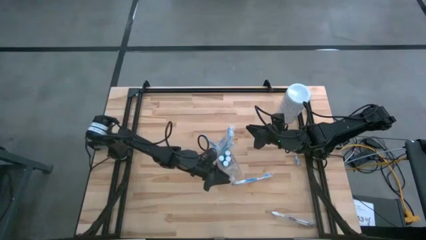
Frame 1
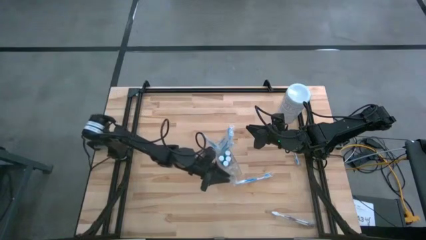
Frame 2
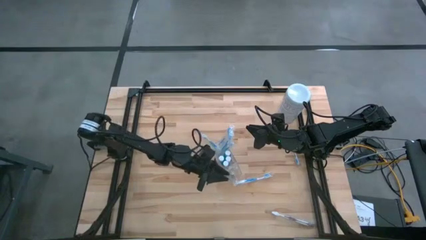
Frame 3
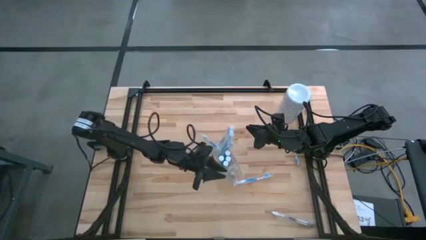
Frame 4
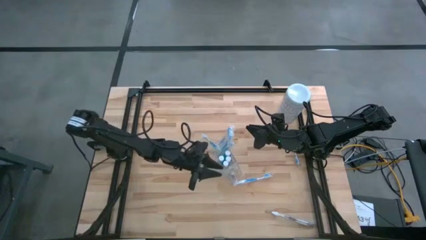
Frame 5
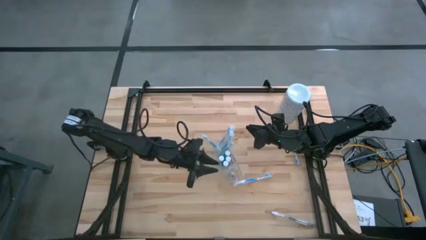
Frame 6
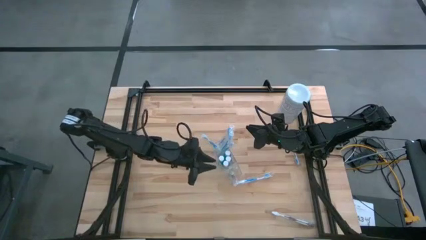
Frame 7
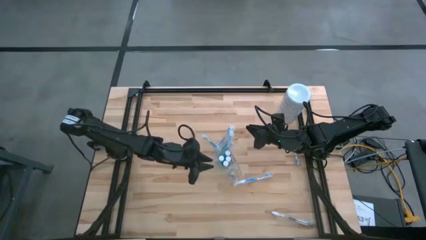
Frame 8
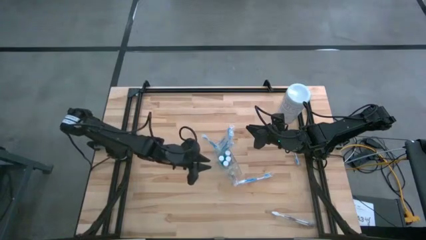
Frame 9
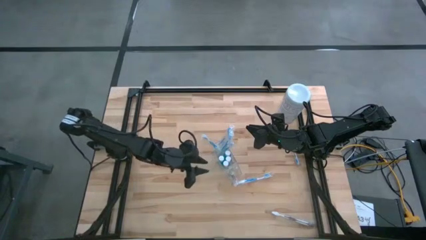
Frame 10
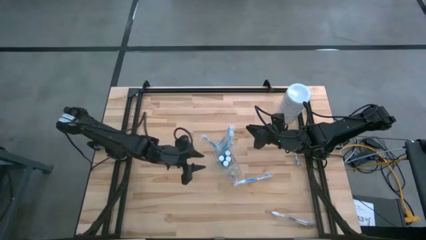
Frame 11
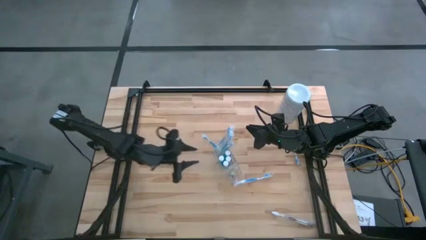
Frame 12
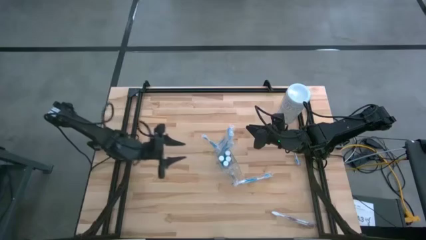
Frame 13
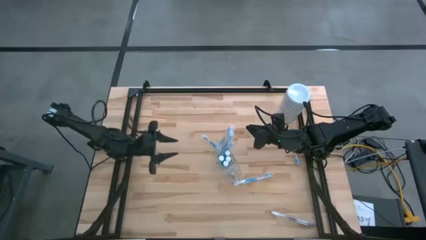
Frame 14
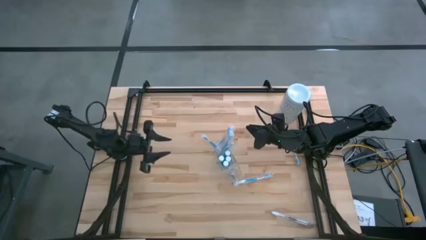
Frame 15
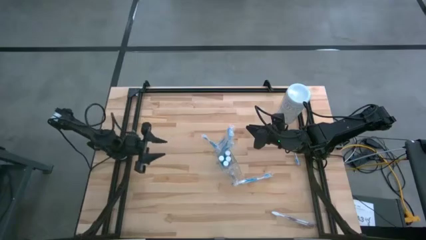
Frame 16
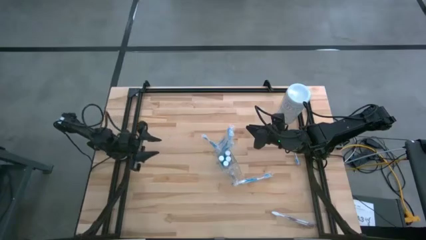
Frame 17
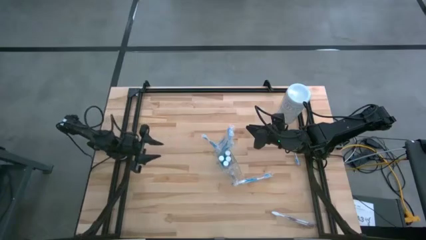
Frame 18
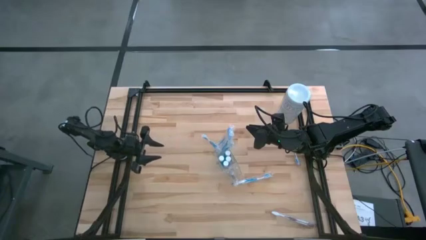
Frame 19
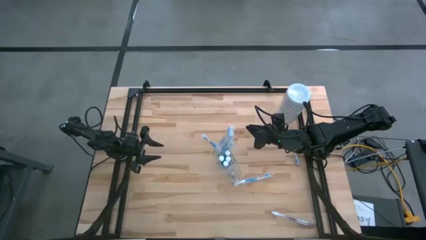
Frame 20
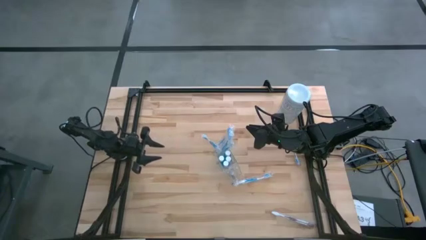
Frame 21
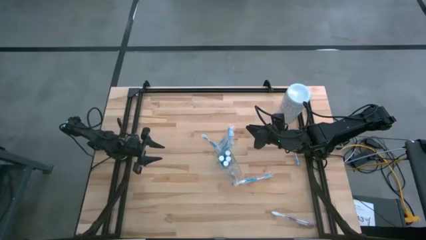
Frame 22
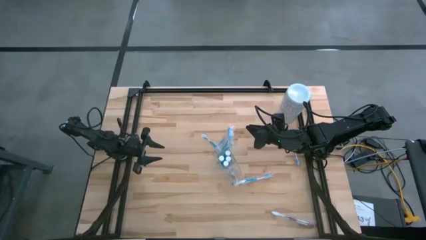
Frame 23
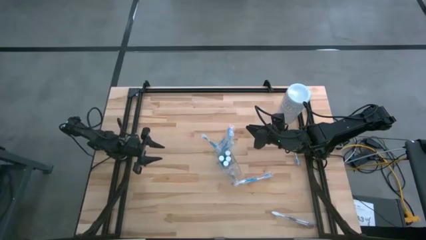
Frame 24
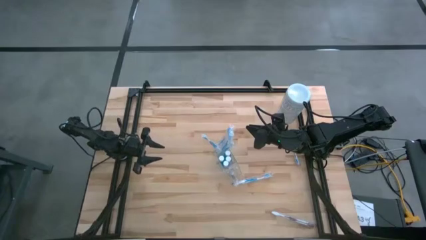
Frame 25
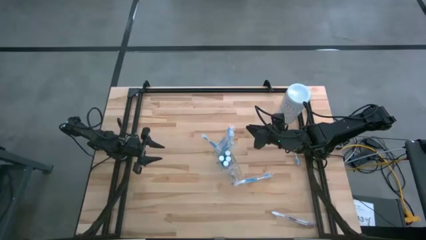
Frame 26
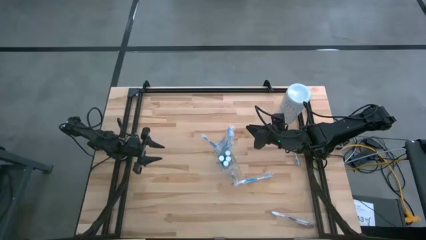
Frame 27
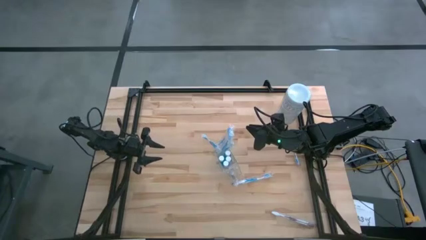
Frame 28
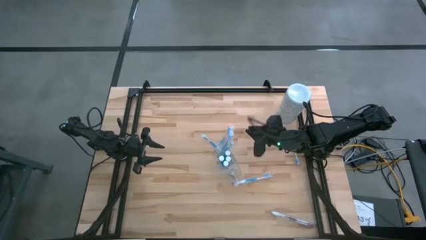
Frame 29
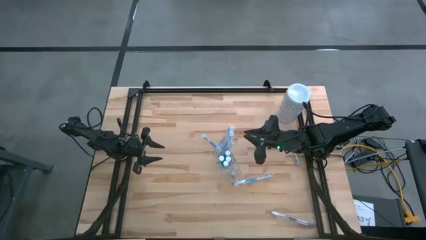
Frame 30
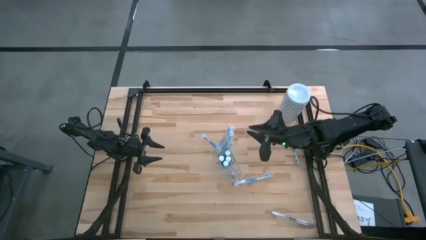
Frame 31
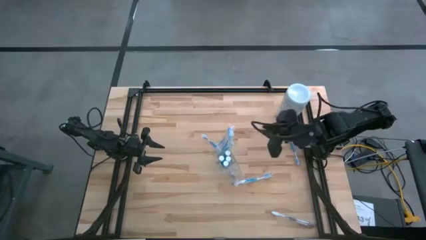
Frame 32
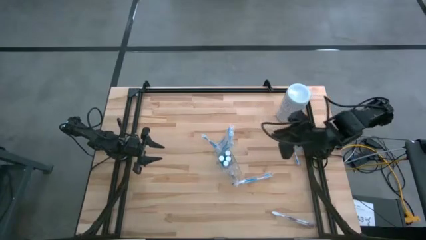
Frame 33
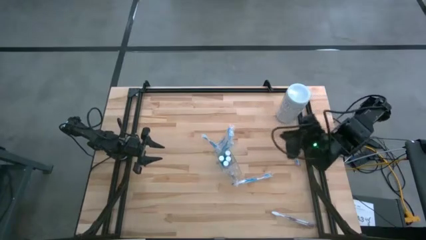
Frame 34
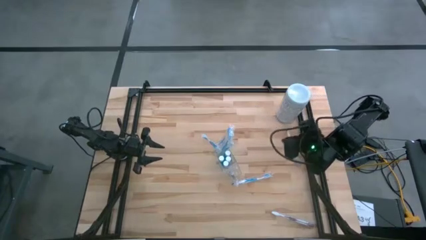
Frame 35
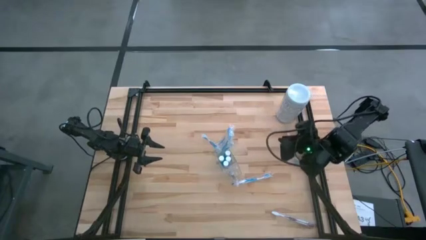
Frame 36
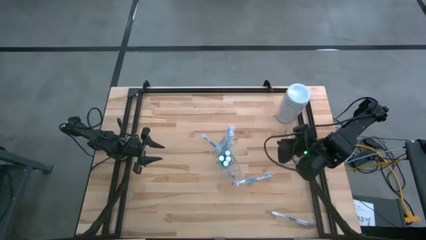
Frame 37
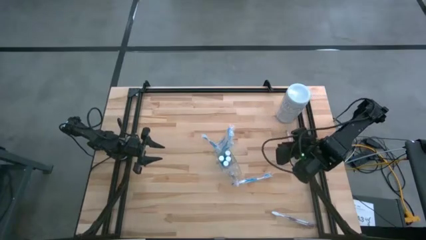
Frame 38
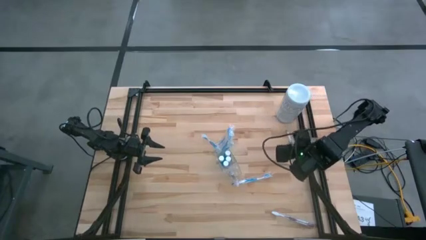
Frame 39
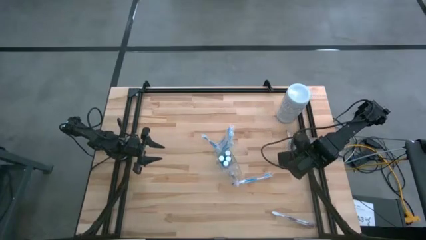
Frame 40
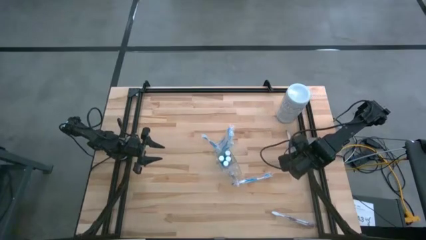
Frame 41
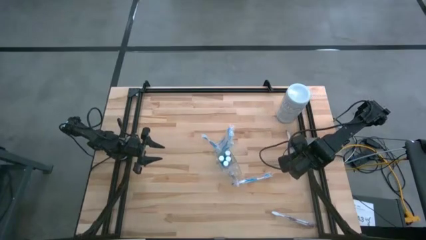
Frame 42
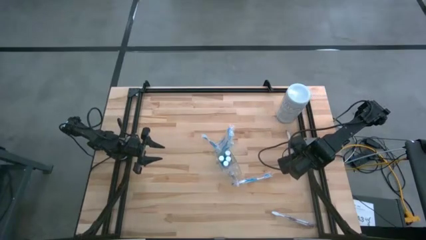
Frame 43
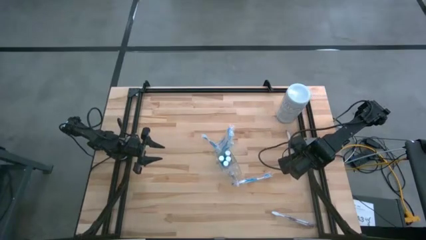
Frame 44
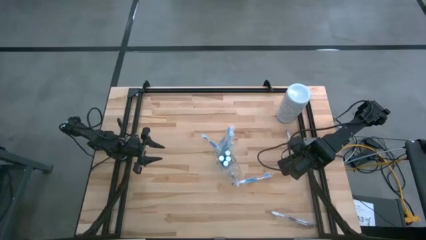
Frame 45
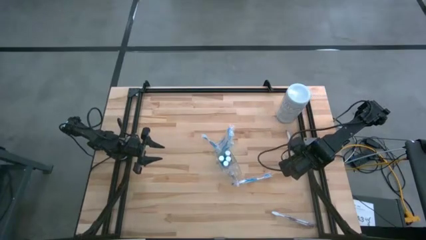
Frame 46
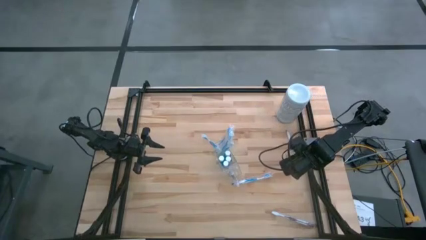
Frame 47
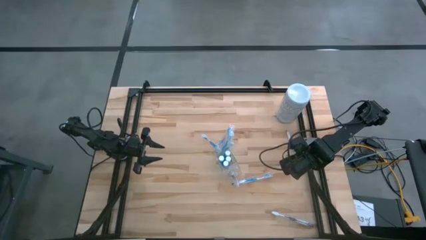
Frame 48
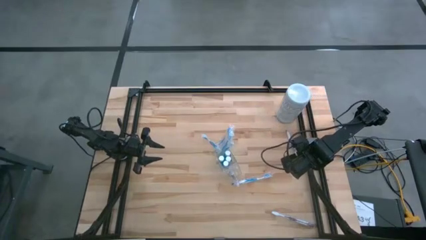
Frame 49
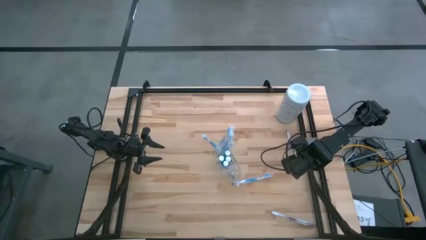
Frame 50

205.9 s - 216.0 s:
Task: Pick & Place toothbrushing station
Put the blue toothbrush into the left section of the transparent organizer

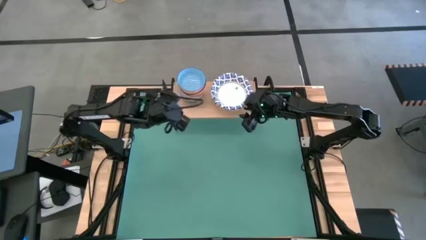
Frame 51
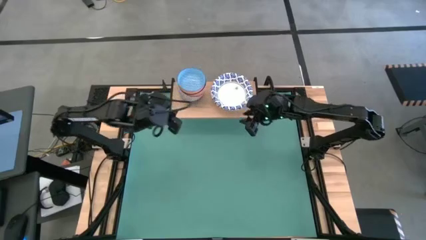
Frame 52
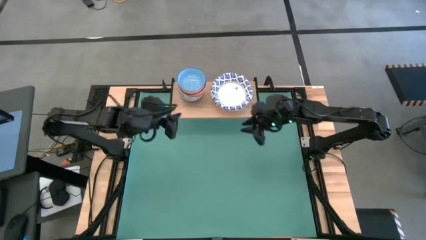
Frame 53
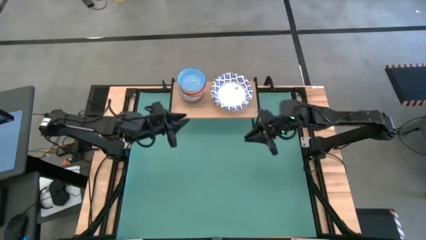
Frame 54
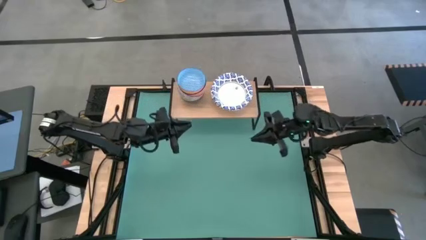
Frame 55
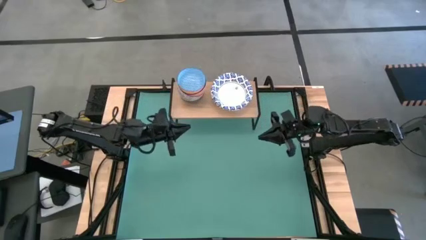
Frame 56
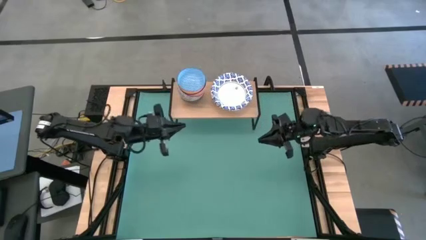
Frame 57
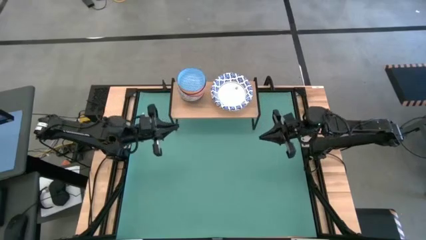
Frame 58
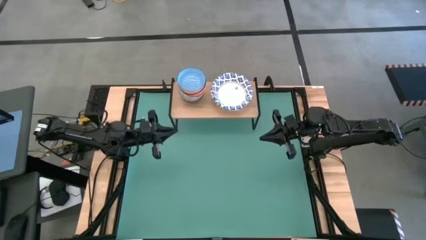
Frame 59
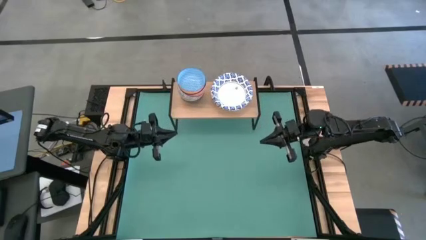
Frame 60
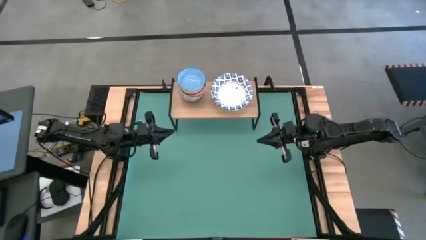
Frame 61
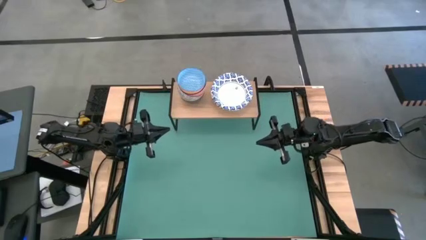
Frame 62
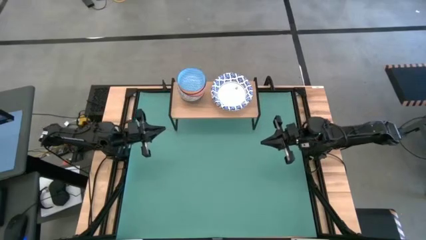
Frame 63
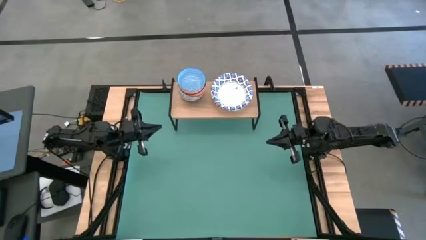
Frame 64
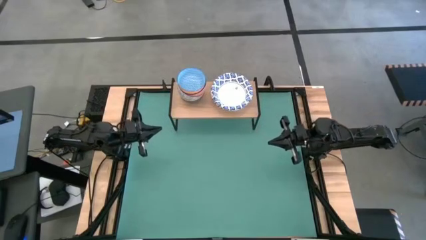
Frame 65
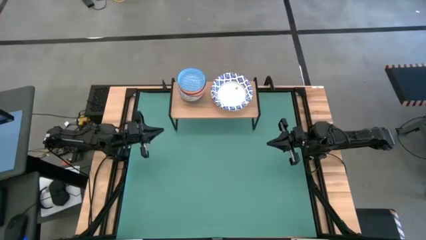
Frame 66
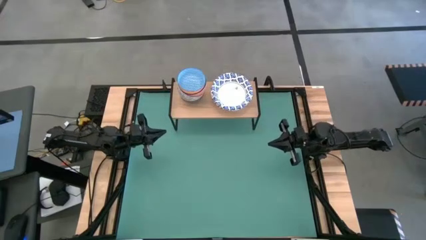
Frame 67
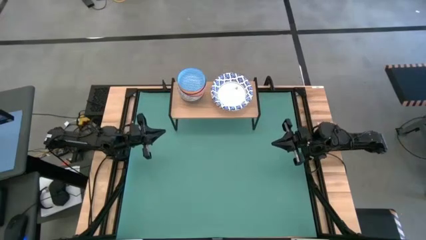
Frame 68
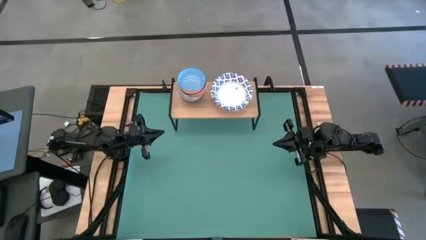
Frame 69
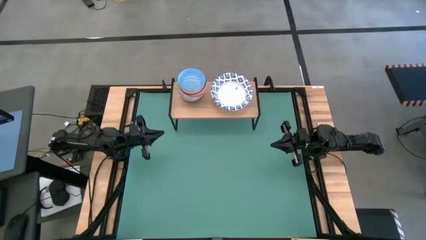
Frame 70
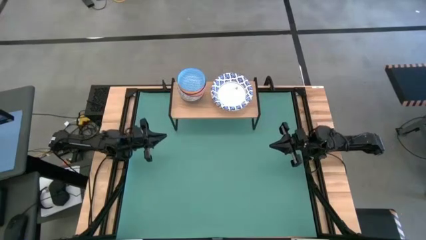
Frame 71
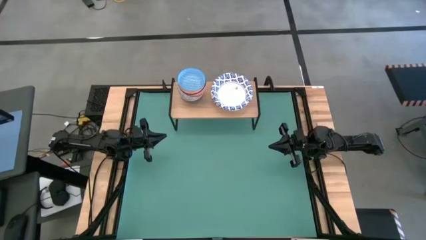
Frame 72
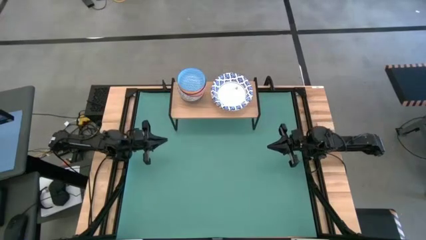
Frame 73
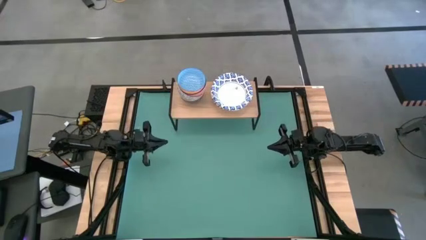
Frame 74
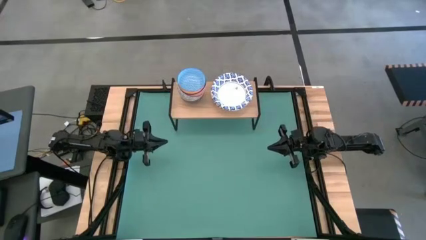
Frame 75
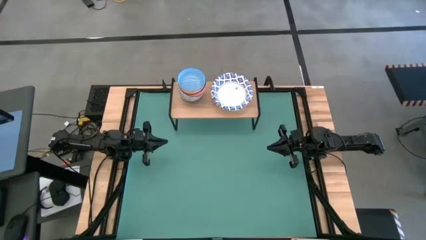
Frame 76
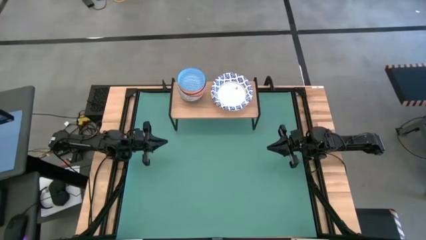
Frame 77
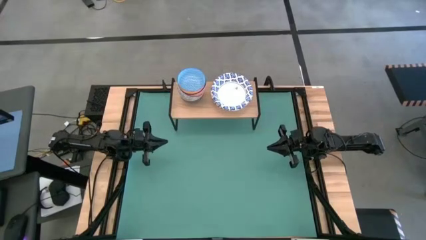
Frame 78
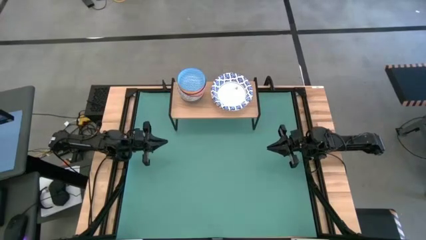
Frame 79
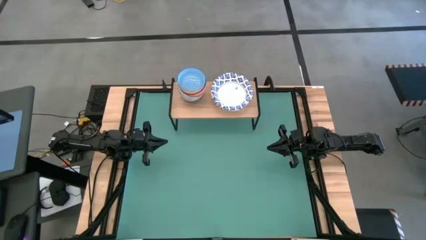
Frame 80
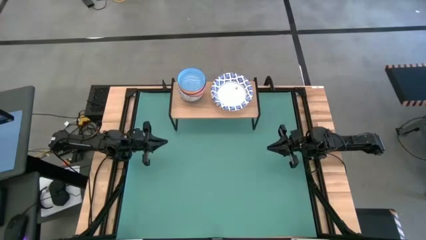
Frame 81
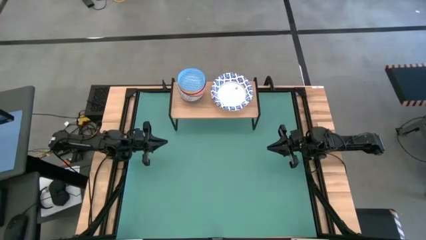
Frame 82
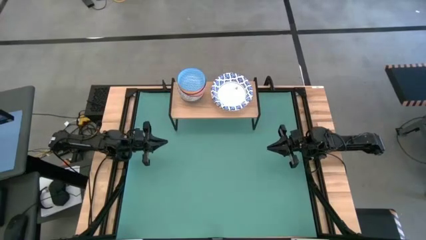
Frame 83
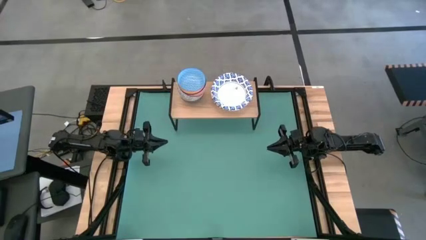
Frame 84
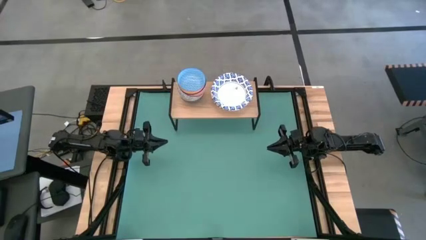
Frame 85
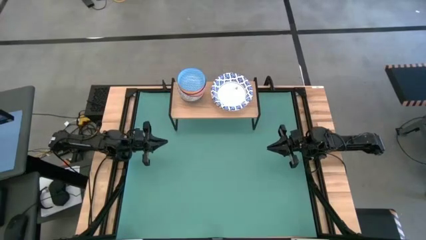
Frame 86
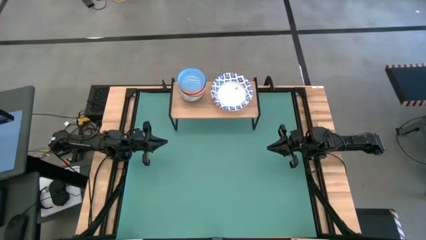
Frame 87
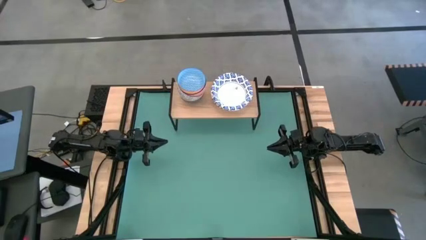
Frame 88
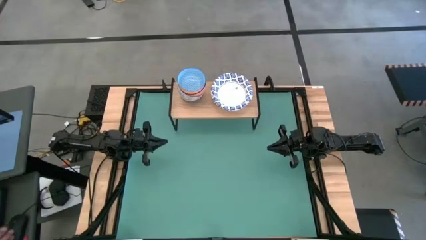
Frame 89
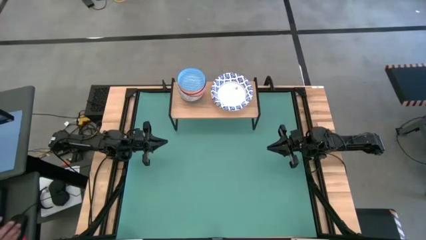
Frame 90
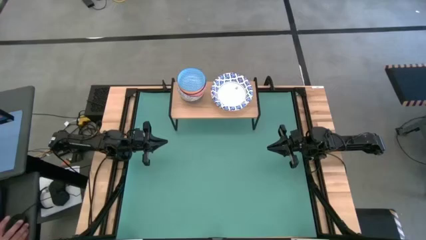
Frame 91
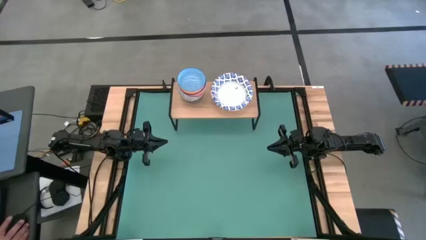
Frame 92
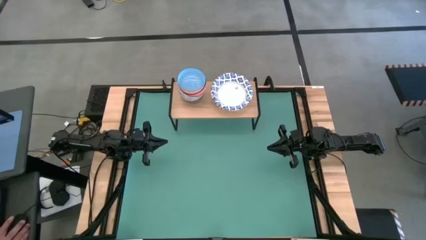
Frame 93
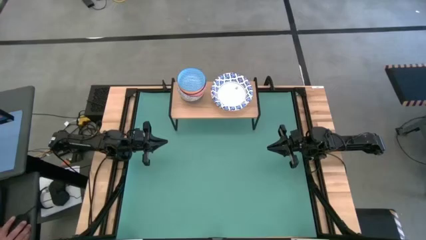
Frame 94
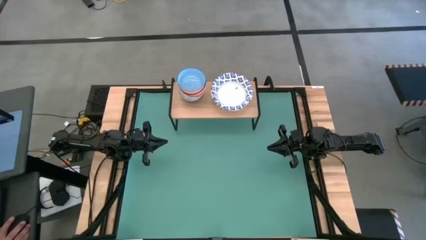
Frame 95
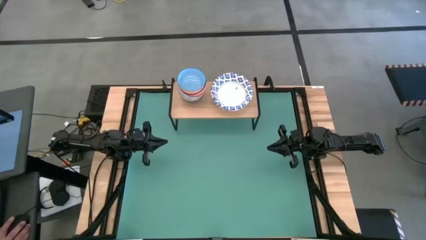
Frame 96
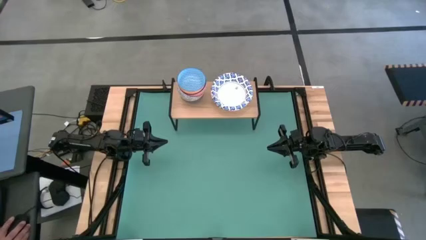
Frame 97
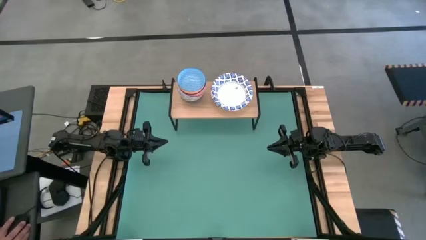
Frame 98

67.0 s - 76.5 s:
Task: Place and stack bowls onto a shelf
Return to Home Position
